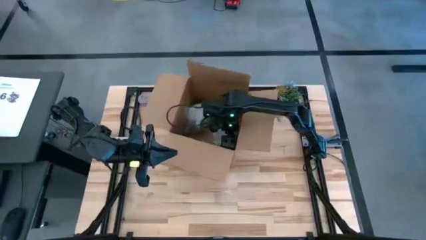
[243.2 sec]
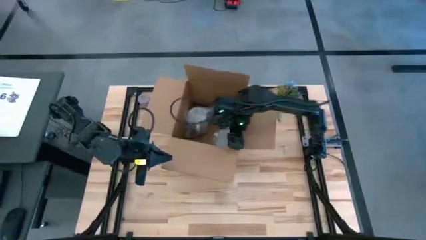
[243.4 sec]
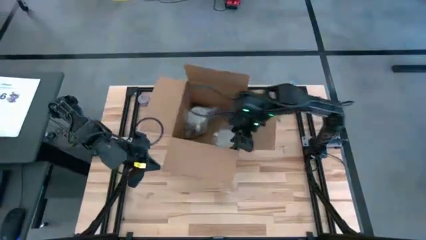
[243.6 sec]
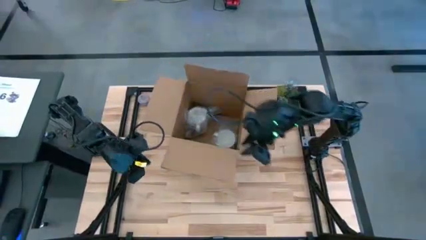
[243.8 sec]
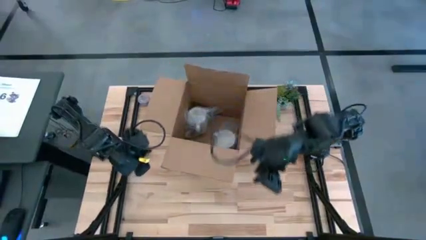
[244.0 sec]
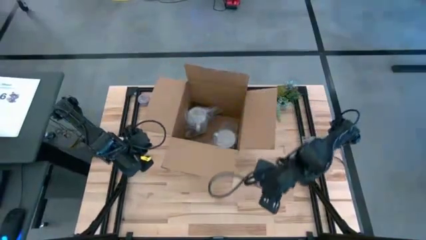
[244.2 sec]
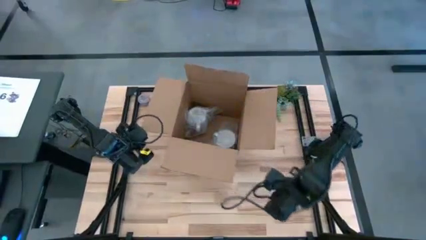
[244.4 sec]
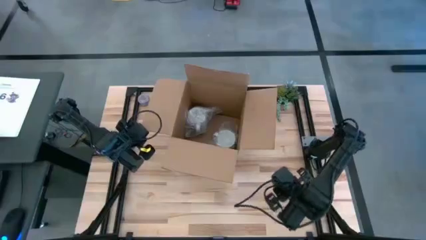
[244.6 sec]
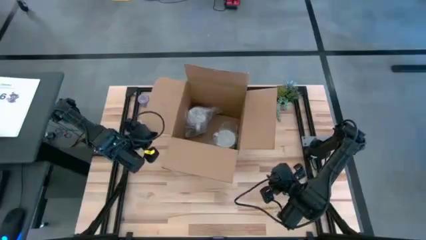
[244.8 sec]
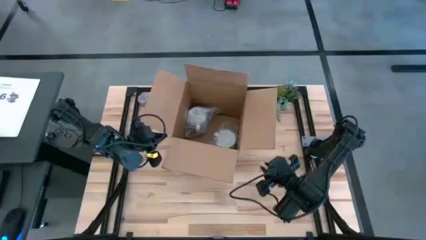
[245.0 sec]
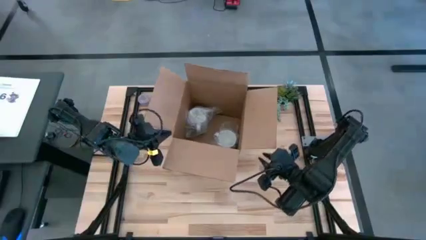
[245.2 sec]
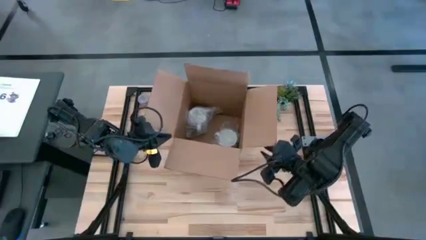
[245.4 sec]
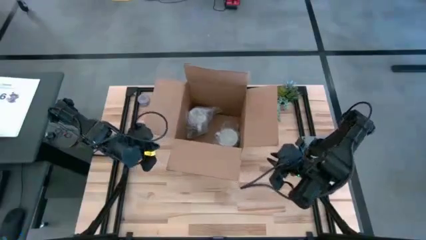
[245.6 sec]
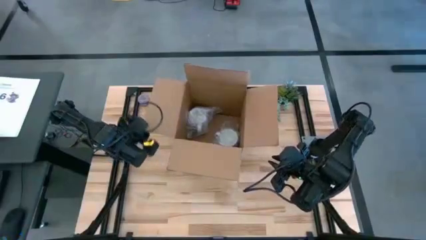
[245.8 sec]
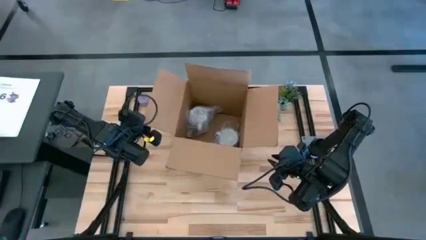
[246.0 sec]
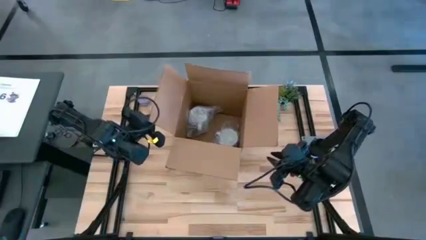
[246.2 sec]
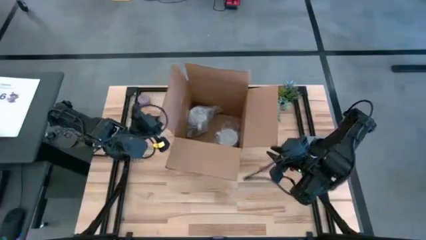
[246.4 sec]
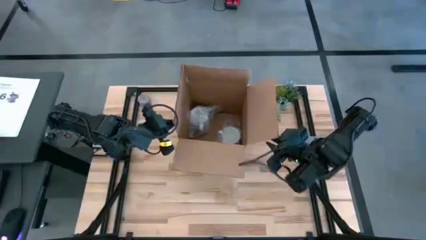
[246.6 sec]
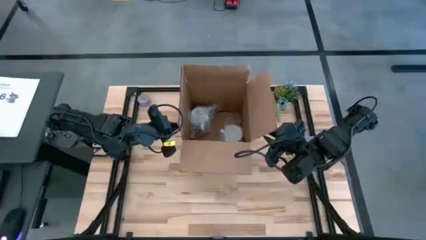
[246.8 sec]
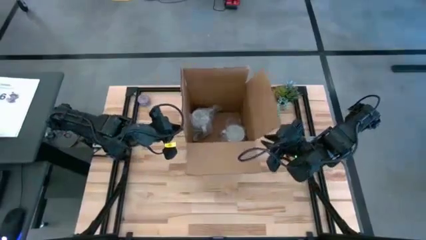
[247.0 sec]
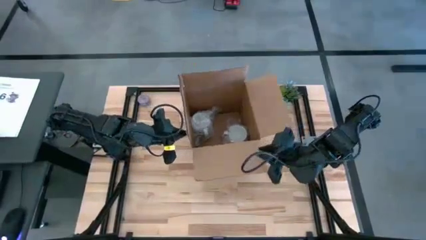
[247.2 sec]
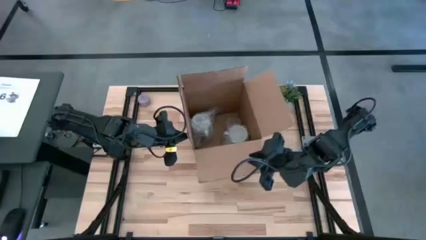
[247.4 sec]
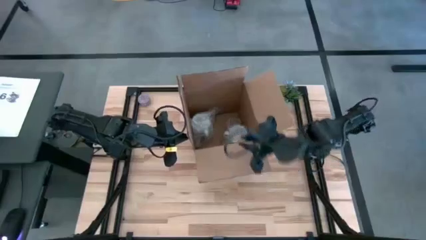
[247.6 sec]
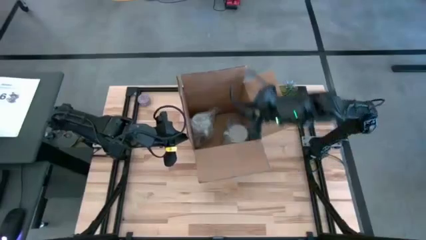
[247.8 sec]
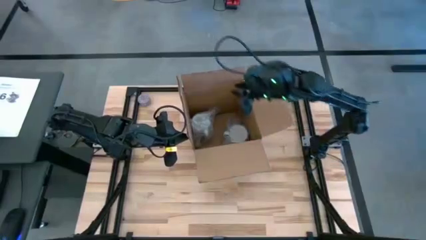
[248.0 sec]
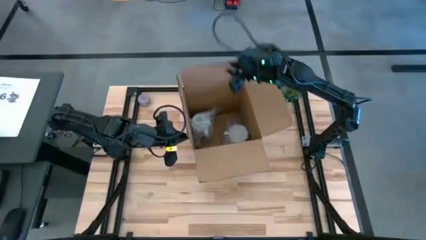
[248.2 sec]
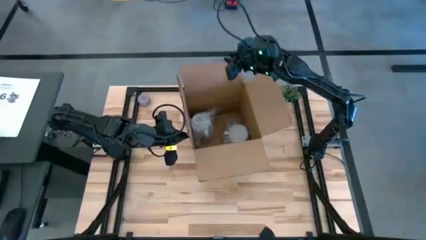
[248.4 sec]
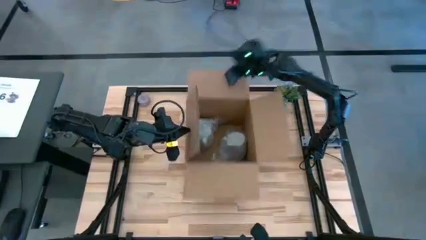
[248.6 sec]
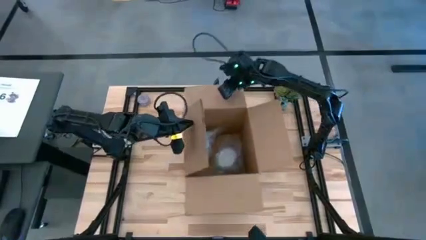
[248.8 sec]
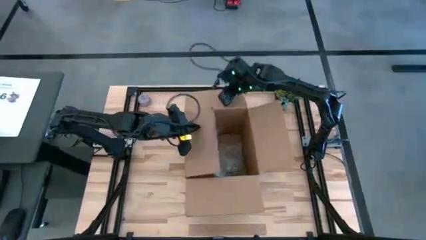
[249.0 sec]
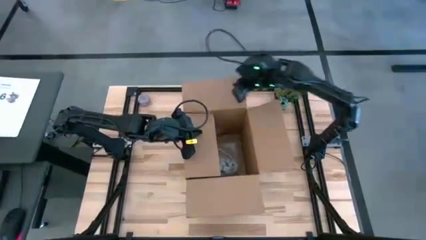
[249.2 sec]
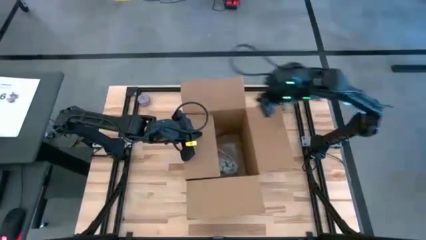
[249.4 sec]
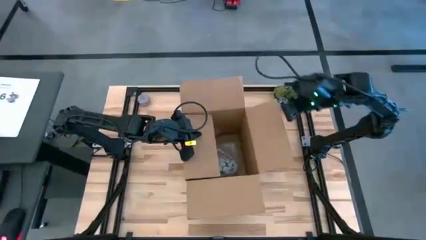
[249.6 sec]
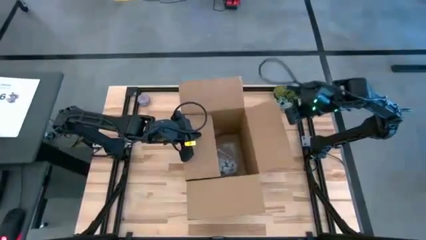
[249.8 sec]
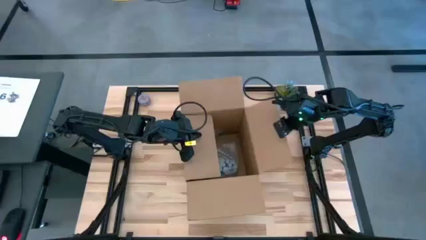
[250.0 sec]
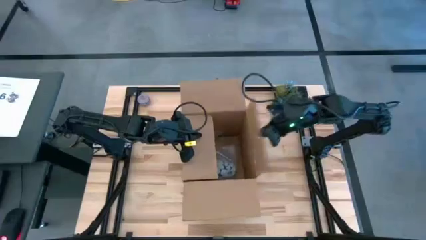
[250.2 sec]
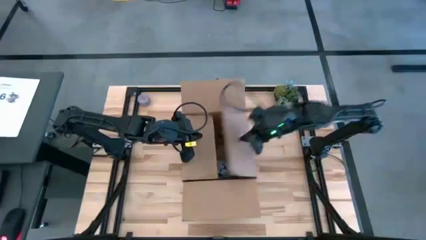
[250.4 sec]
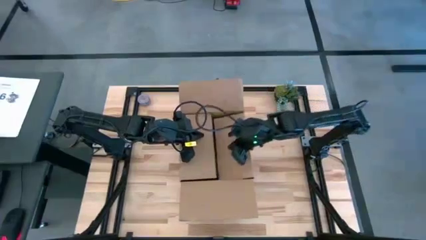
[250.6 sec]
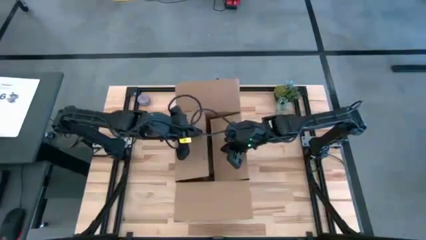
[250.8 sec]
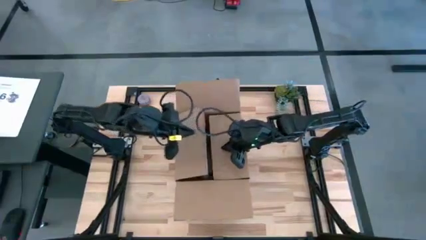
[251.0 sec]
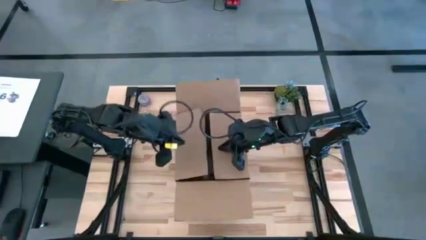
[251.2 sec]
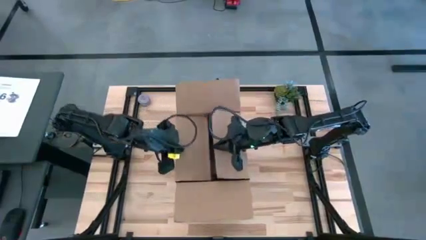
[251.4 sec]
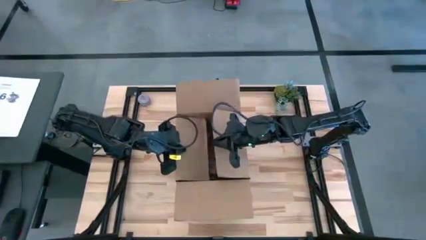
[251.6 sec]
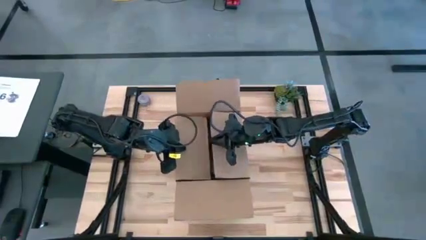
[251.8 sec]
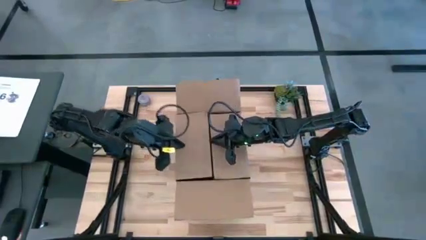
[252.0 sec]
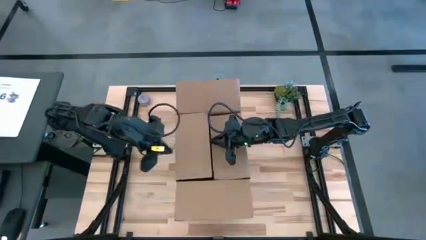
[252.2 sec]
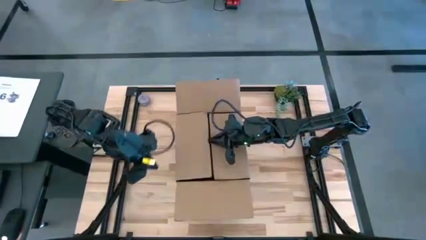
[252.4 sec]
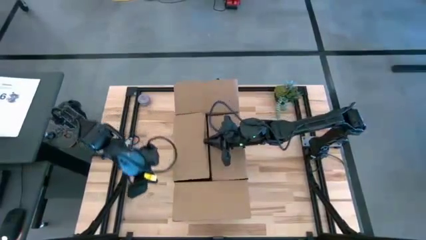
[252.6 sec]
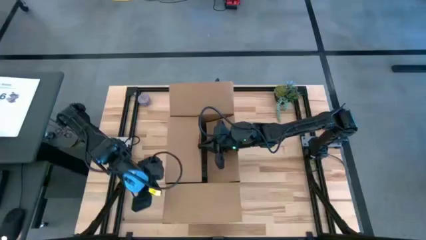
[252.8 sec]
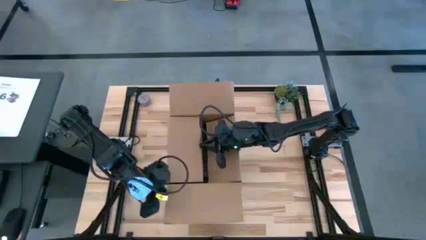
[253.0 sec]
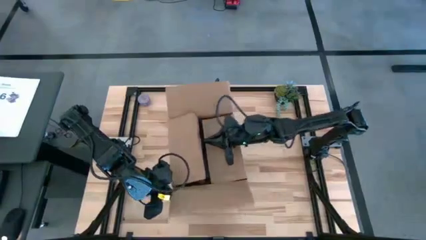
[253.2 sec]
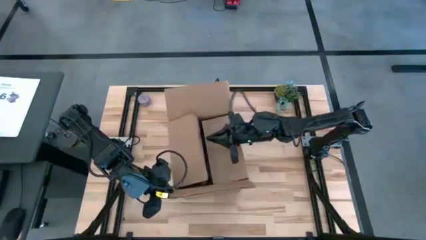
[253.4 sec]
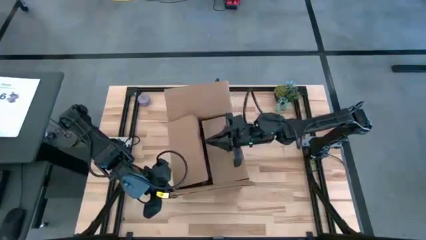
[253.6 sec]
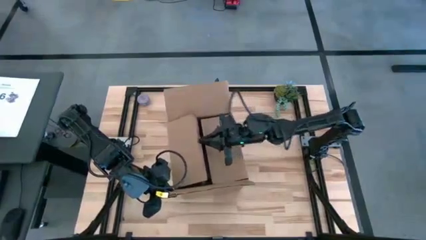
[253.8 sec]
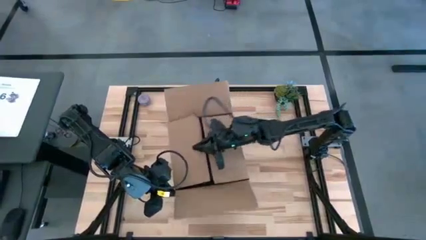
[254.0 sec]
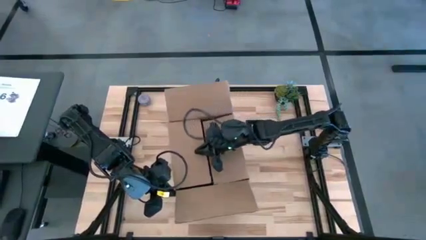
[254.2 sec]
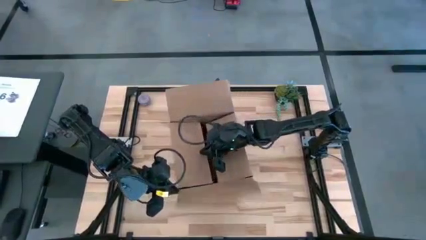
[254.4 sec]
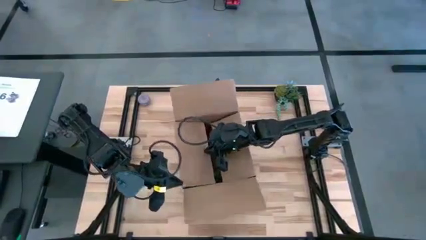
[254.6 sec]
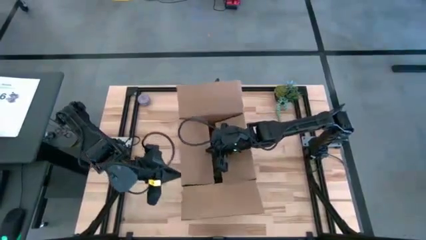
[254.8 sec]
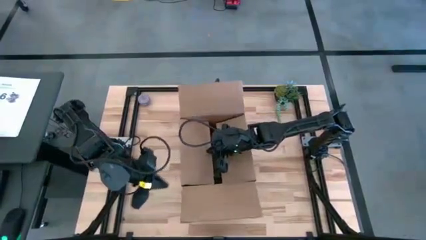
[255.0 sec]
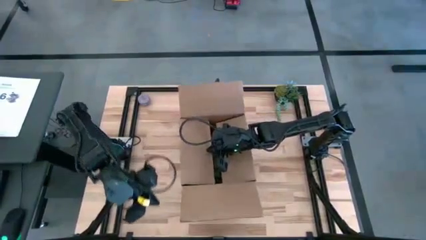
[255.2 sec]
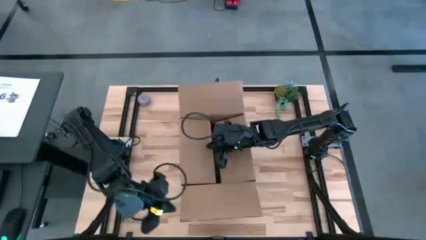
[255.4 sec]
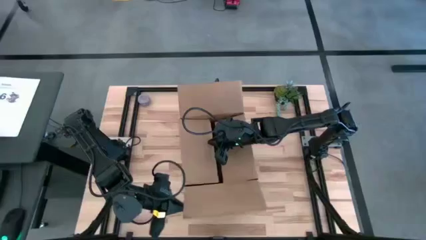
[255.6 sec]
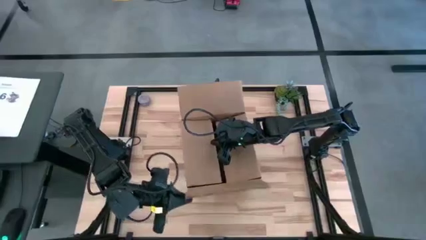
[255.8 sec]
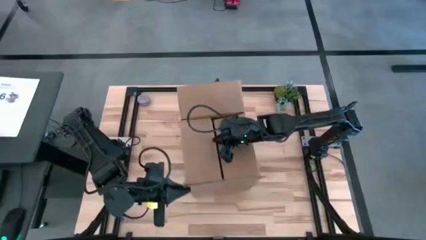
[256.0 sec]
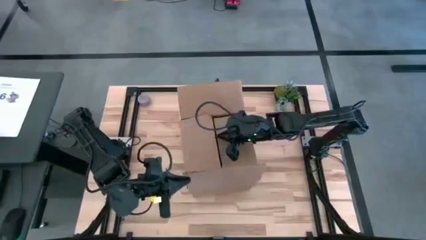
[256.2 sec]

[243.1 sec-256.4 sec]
Task: wrap mug
Close the cardboard box

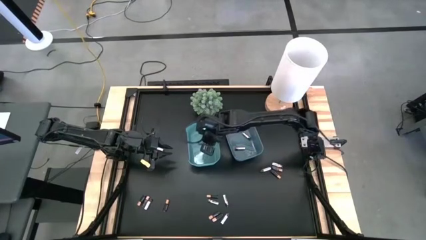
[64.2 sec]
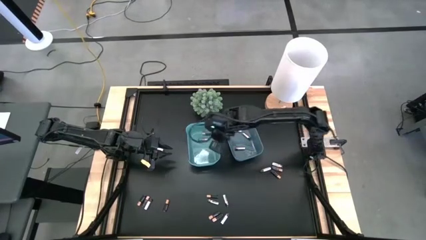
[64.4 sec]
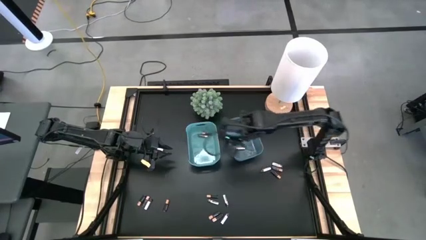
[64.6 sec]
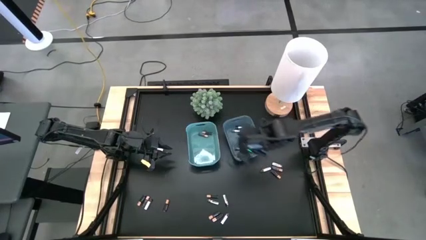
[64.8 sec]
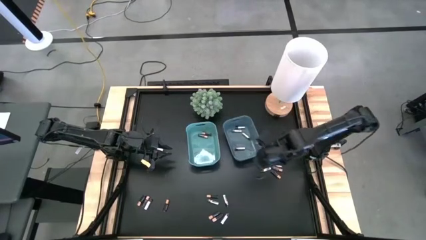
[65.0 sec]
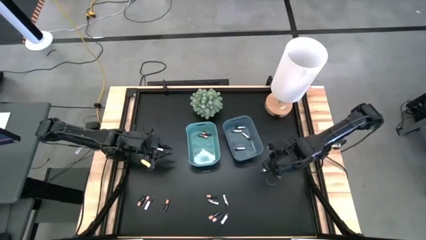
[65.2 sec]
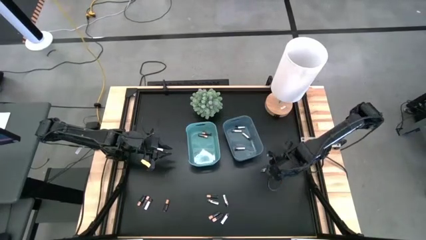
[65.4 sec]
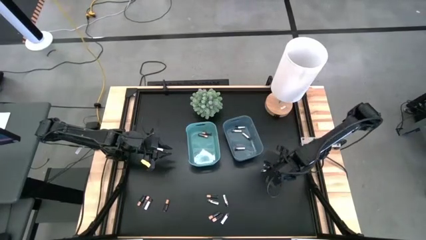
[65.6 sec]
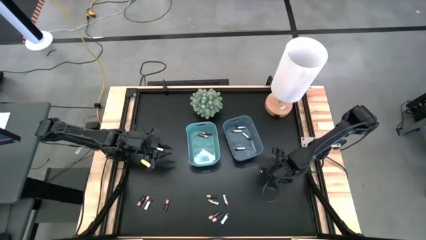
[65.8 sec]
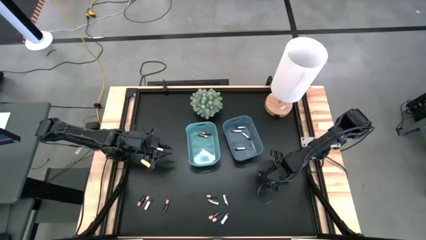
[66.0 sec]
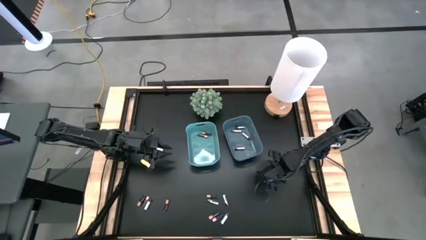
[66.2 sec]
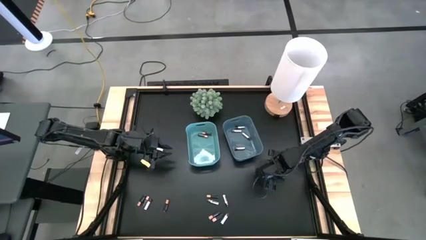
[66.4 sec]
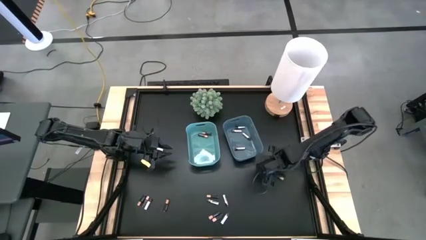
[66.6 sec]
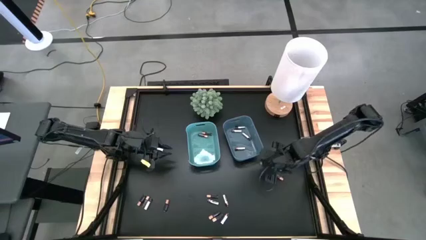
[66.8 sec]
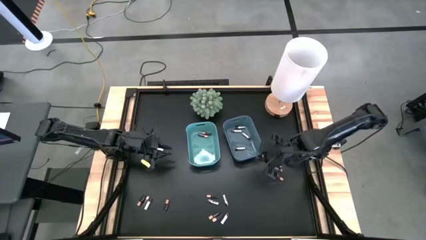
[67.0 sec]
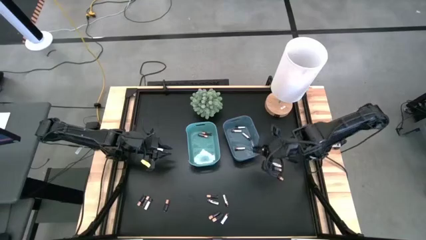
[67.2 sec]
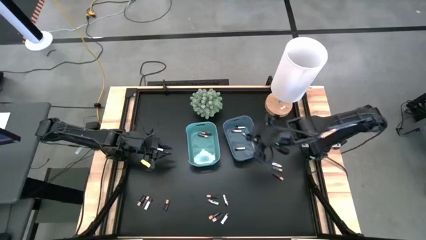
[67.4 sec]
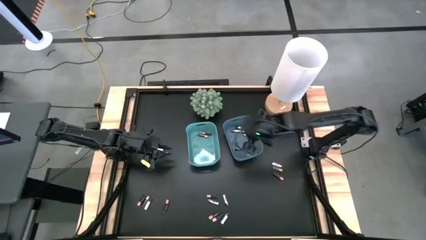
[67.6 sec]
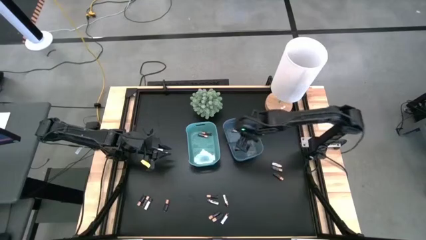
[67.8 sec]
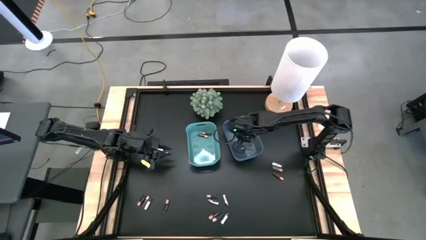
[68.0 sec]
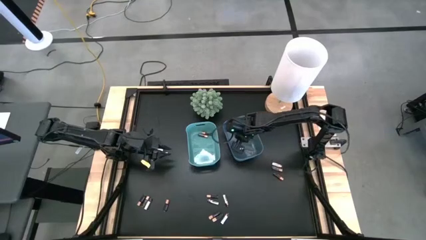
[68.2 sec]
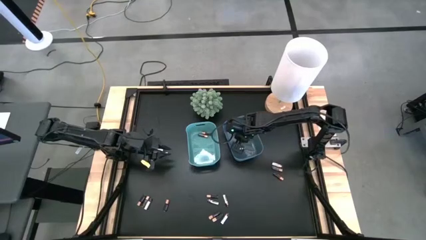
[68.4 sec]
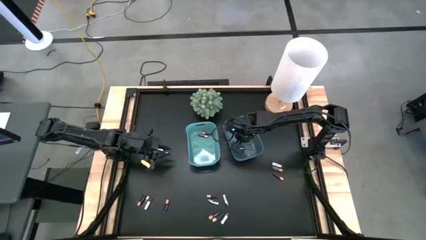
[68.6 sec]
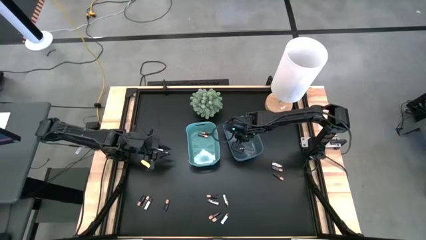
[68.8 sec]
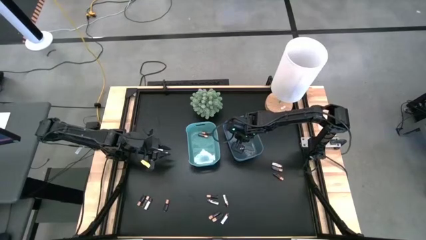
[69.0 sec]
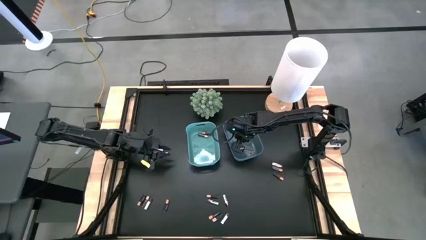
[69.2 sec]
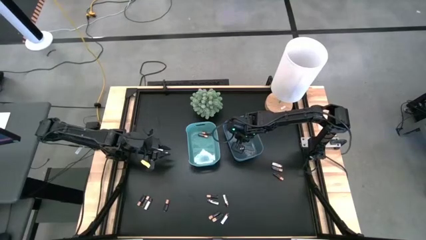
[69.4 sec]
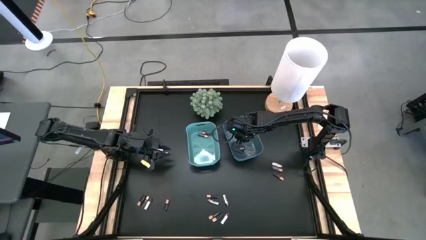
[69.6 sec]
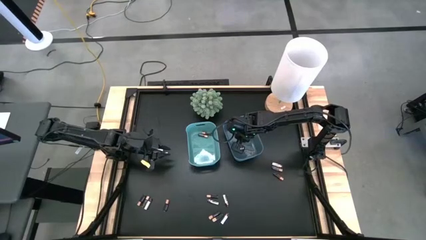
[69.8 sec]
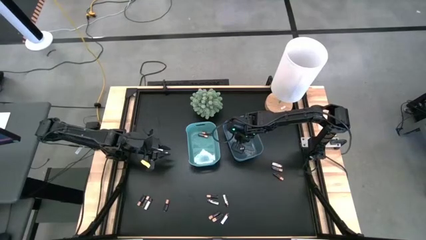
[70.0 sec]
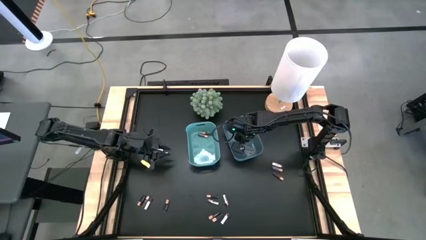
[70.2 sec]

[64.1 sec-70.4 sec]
Task: Sort batteries
Put the black battery into the green bin
